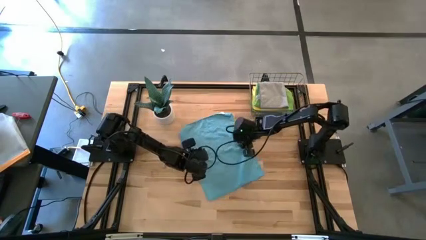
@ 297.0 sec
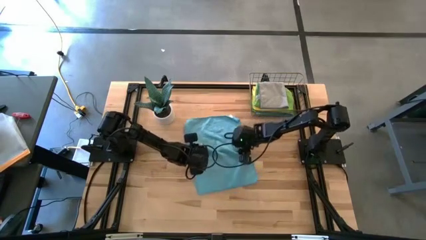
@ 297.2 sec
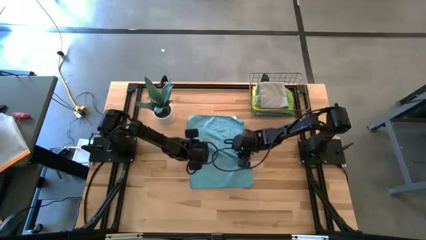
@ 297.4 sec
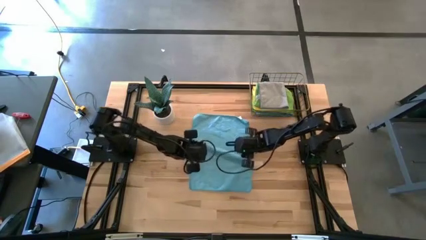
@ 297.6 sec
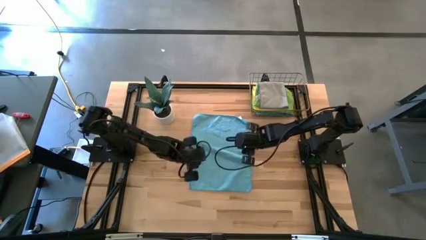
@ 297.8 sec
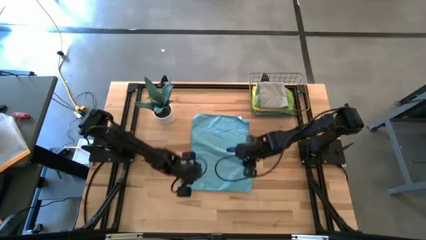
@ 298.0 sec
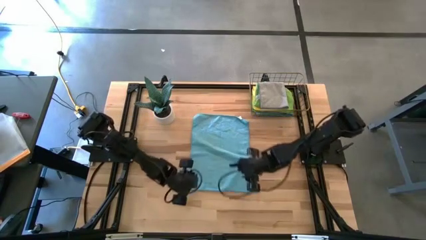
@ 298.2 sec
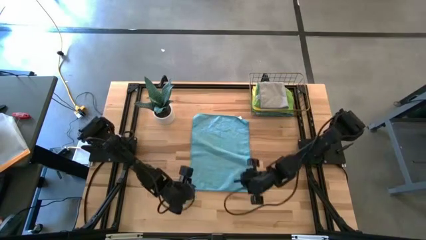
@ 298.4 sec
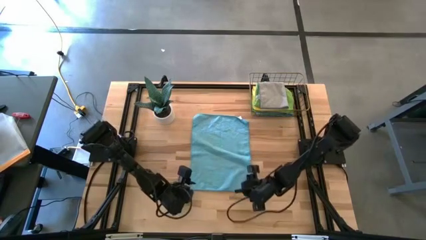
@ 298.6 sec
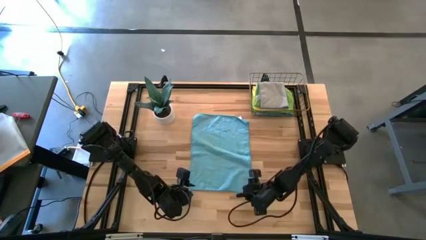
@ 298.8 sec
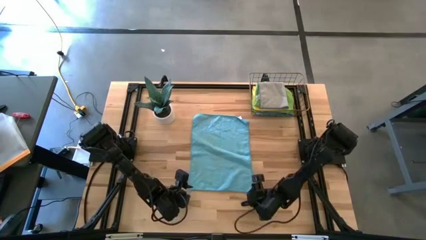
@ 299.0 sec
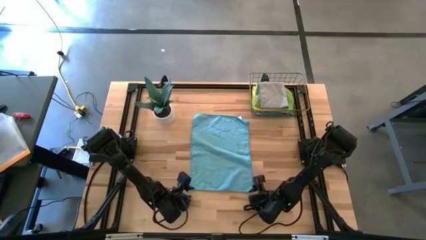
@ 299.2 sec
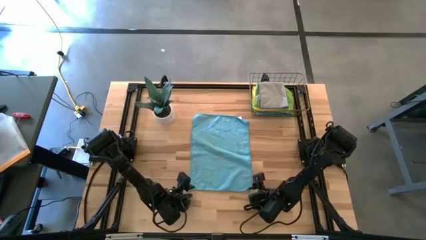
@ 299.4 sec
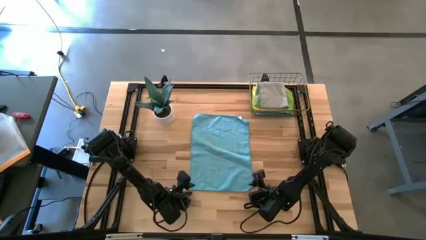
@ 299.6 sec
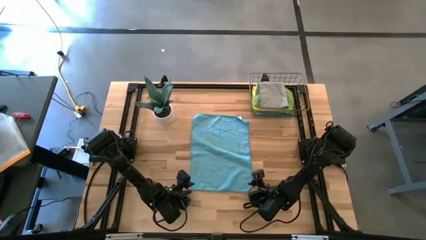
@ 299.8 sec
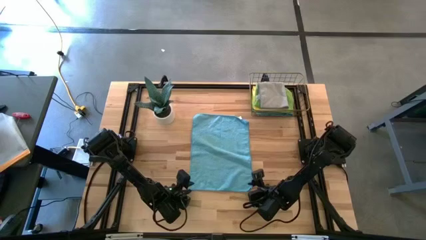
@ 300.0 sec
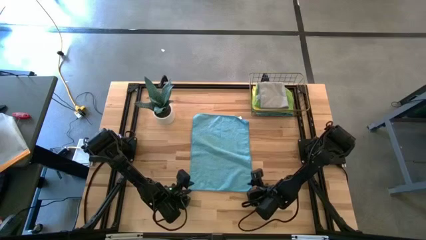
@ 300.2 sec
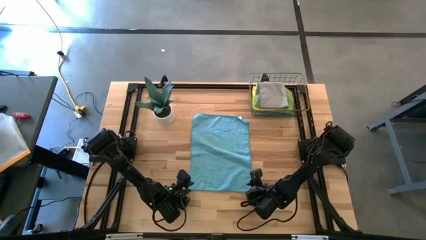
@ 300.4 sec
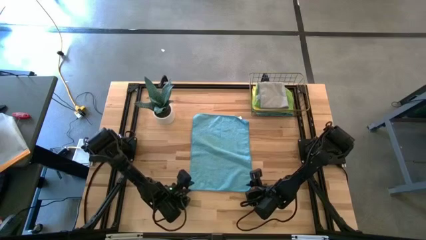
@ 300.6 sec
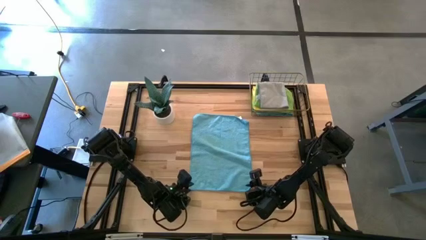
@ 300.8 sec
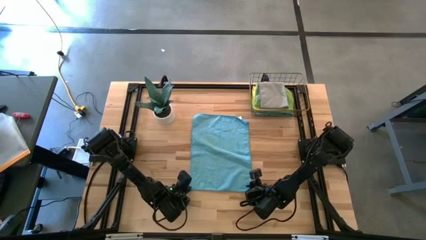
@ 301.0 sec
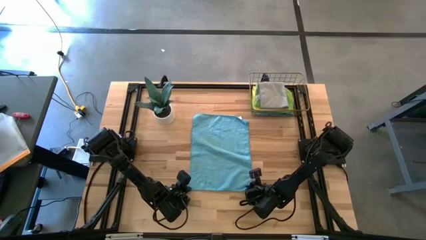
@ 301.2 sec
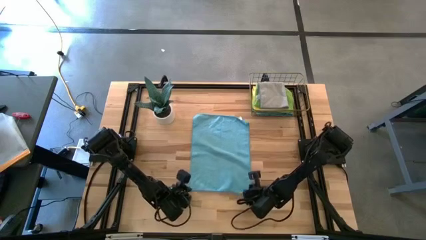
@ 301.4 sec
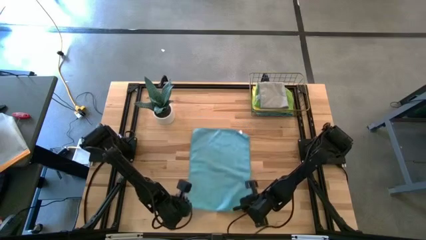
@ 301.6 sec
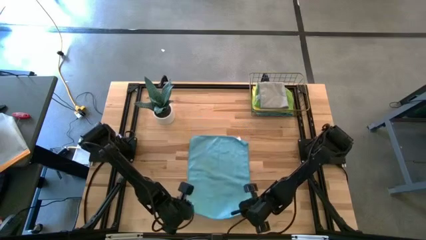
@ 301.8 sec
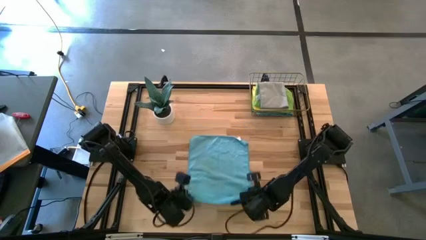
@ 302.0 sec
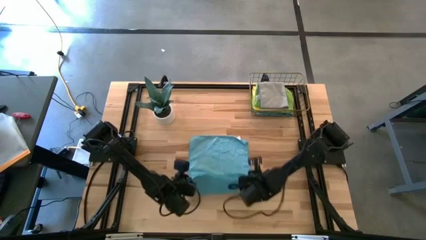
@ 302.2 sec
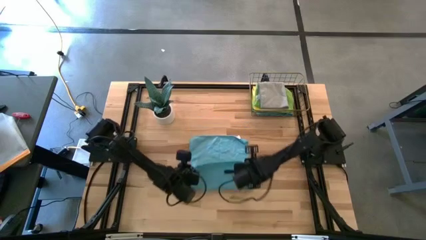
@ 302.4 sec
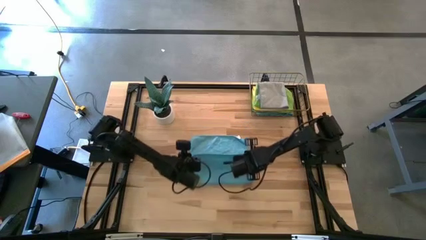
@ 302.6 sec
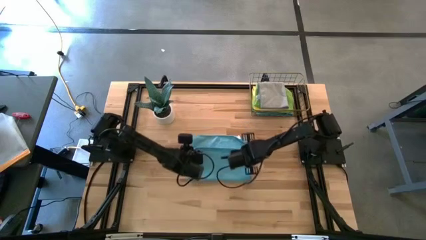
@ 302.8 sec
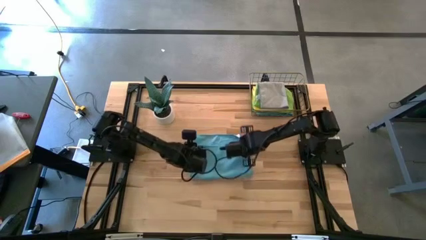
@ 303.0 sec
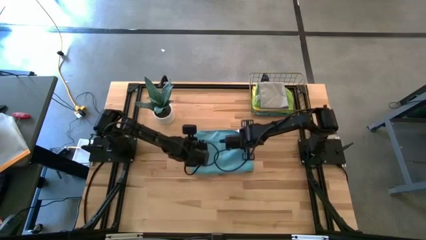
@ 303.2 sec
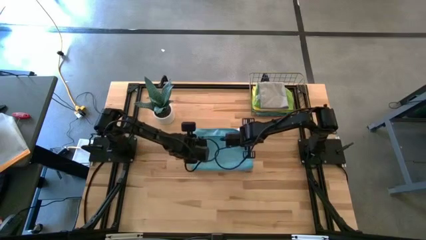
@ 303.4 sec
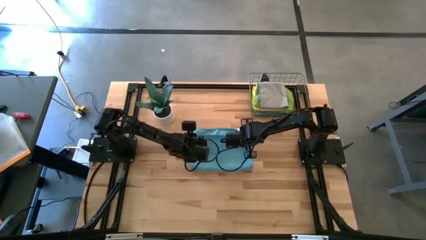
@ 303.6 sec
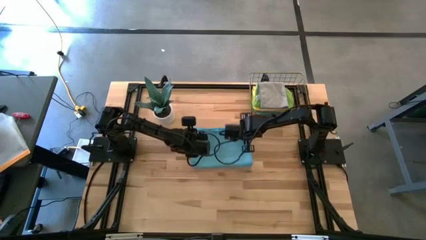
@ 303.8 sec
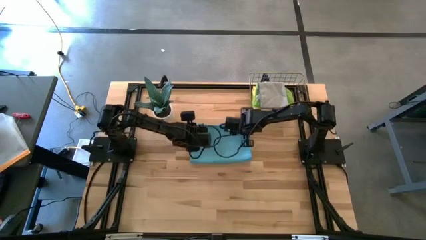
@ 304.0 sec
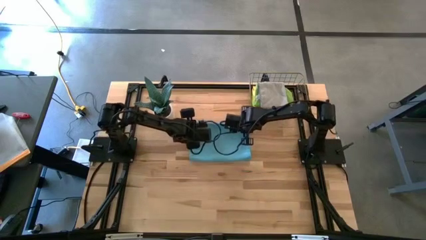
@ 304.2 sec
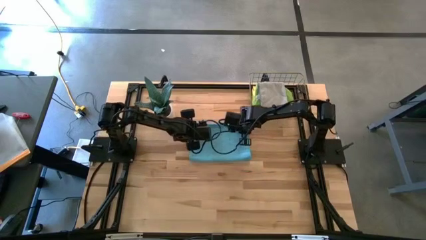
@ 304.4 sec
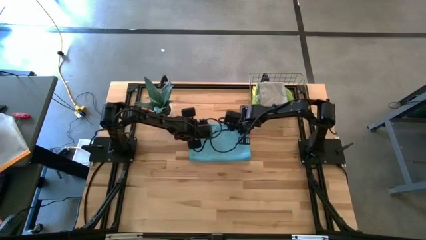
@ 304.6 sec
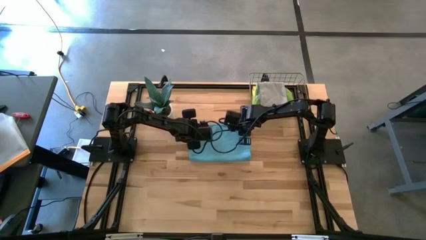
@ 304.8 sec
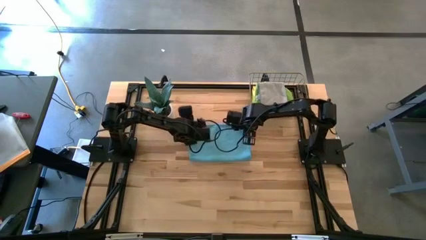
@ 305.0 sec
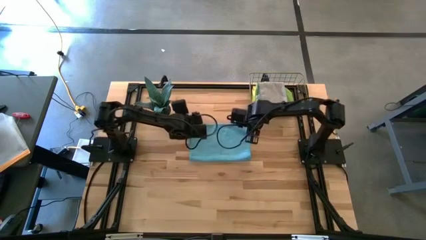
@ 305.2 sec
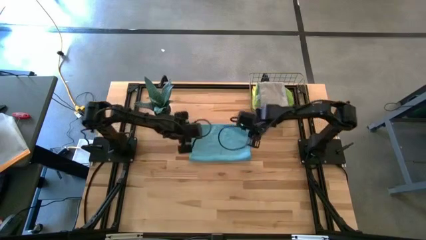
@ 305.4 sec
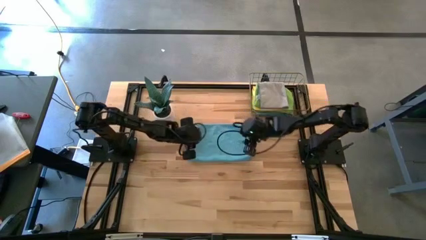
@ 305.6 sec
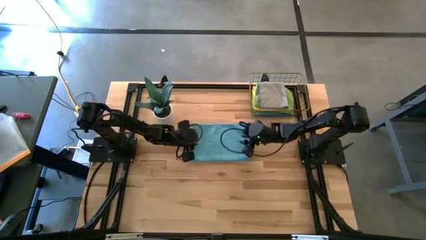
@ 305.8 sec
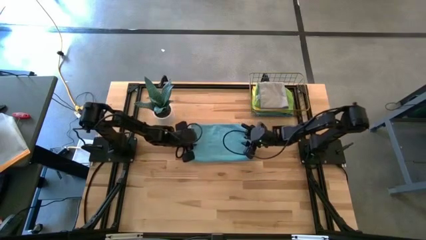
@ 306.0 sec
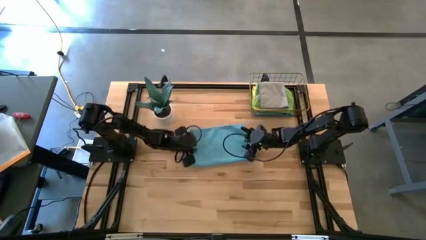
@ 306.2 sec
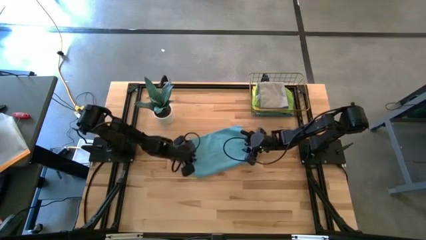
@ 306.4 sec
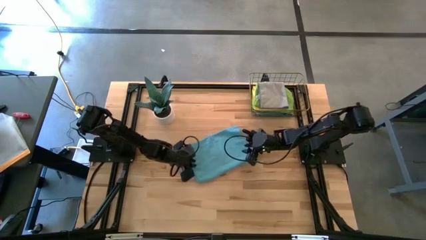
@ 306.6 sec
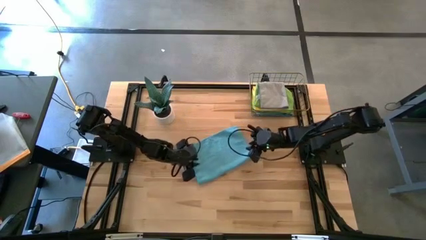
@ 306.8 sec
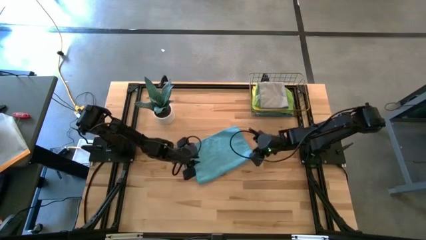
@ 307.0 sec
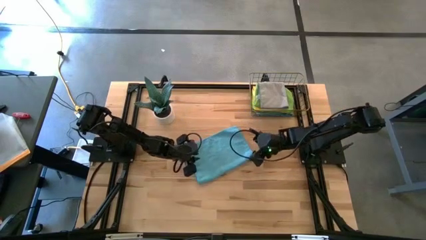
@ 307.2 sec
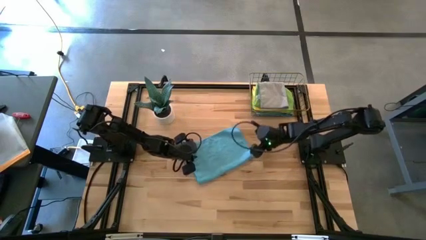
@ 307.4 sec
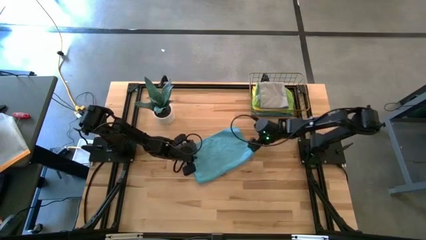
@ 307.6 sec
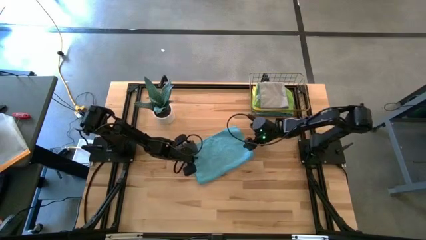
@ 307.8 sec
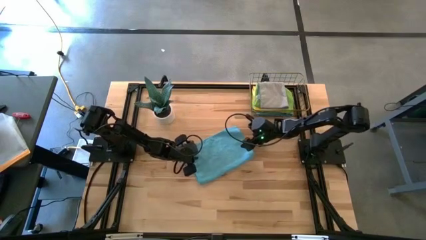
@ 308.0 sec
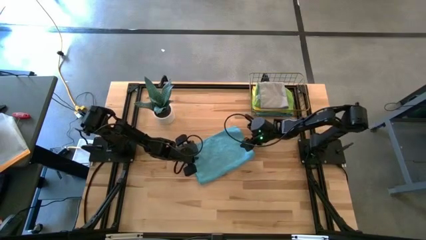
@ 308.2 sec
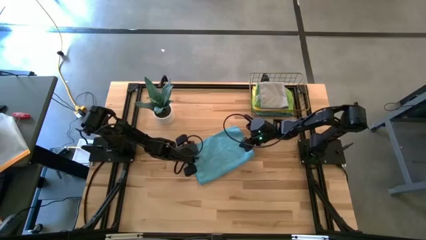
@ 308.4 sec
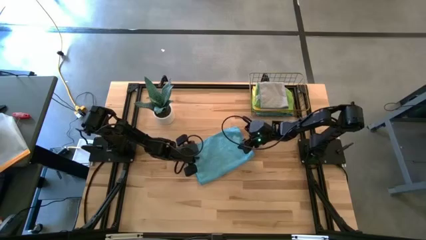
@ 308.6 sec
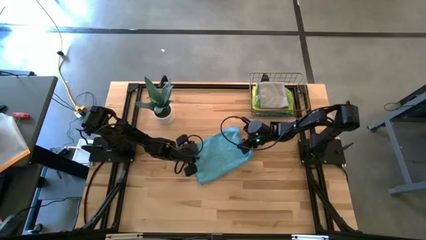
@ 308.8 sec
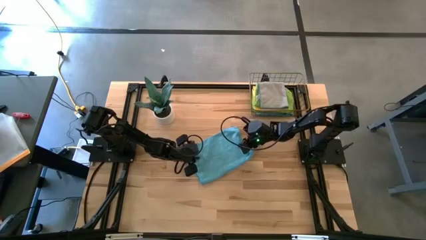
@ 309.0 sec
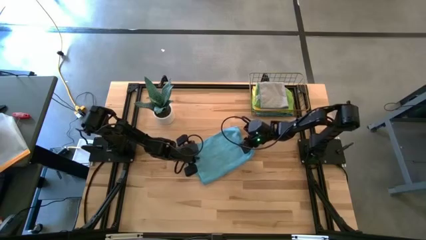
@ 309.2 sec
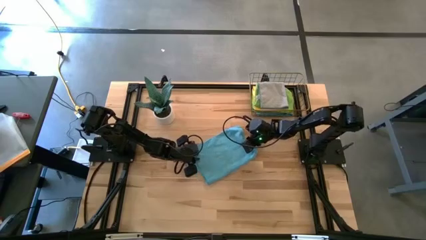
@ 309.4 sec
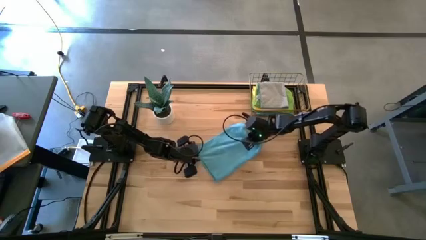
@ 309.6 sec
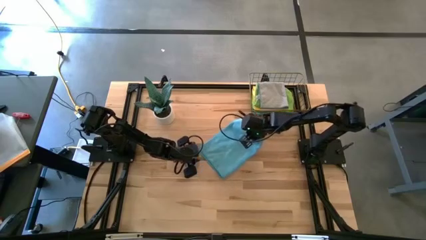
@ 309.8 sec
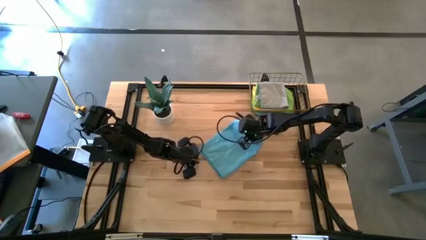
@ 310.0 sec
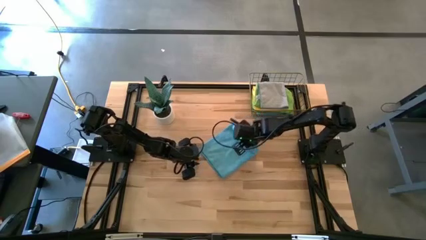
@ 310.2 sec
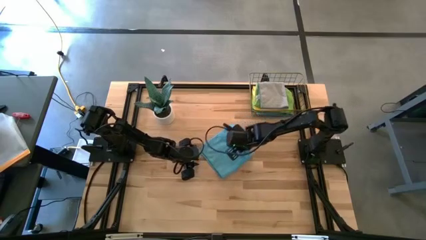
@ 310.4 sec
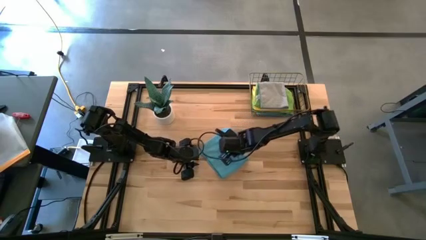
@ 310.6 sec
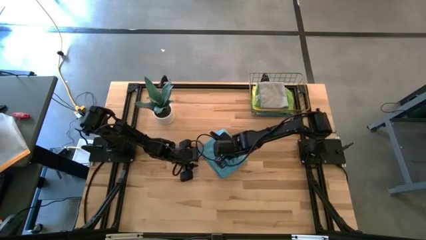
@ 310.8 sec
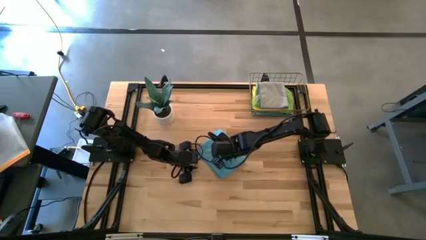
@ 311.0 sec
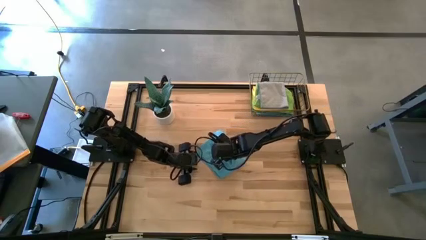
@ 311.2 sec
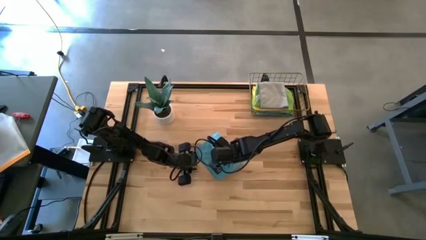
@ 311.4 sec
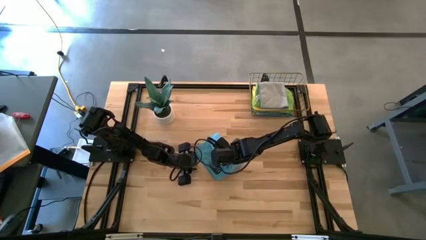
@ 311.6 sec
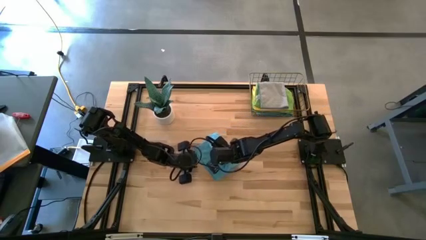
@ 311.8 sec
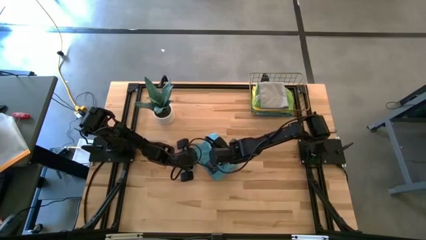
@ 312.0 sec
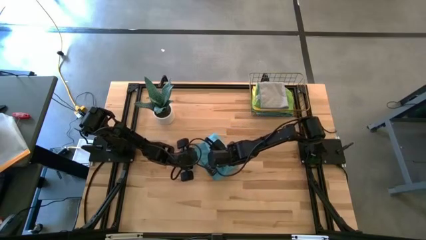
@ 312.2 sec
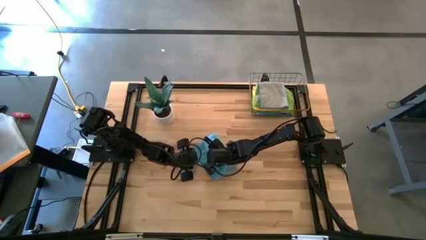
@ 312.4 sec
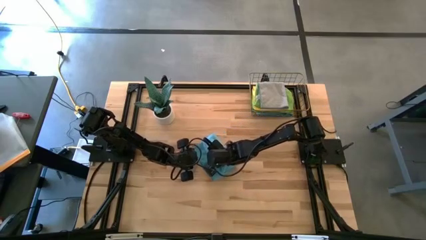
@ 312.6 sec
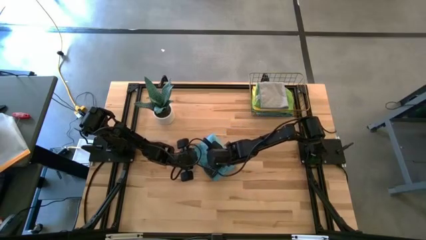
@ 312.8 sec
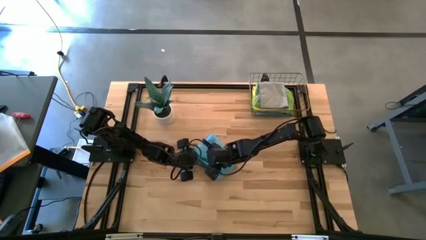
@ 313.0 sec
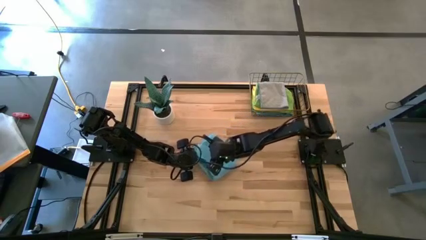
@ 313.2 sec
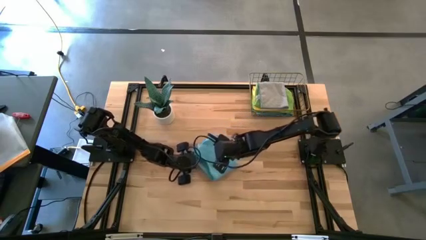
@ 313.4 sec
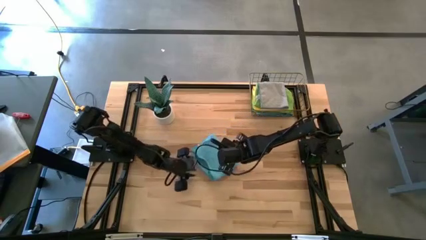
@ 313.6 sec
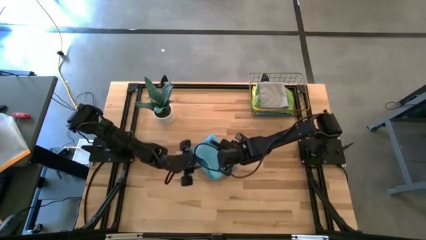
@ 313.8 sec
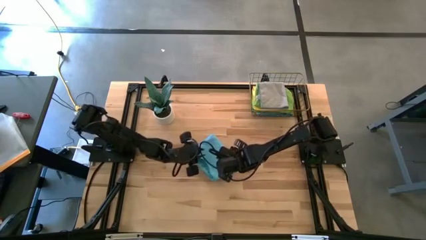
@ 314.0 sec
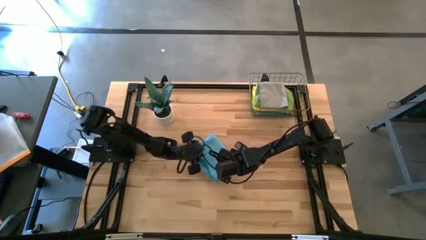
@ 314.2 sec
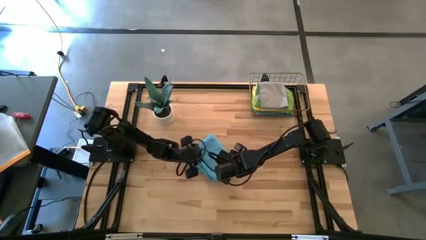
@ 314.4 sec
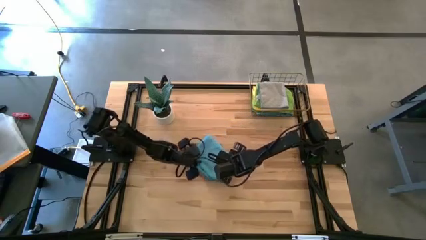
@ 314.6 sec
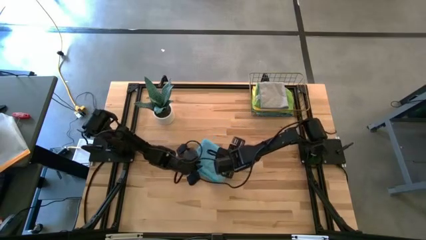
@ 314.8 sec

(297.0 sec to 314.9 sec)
Task: Fold microfiber towels
Fold the blue towel
